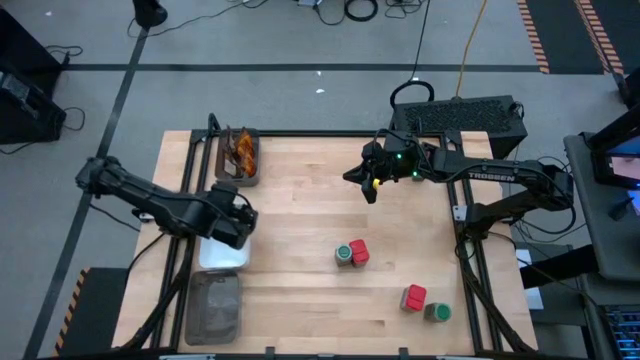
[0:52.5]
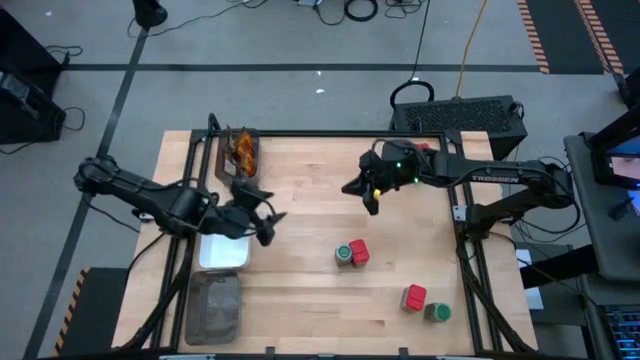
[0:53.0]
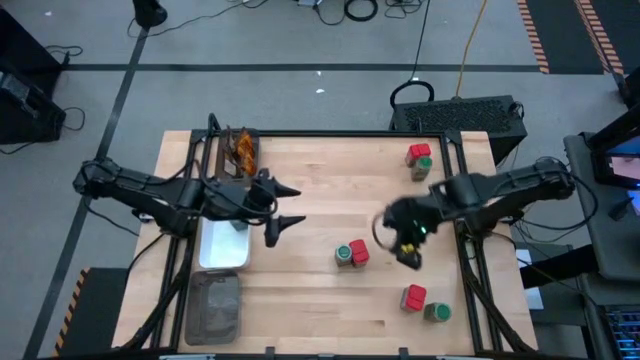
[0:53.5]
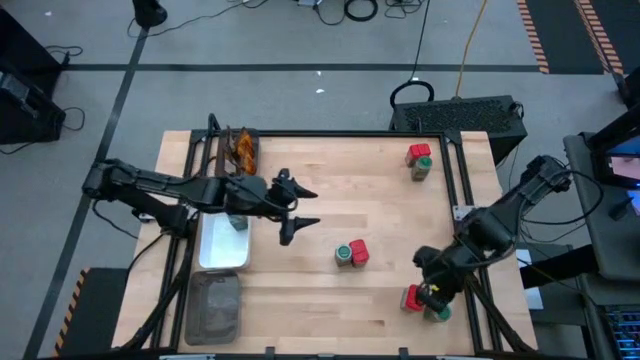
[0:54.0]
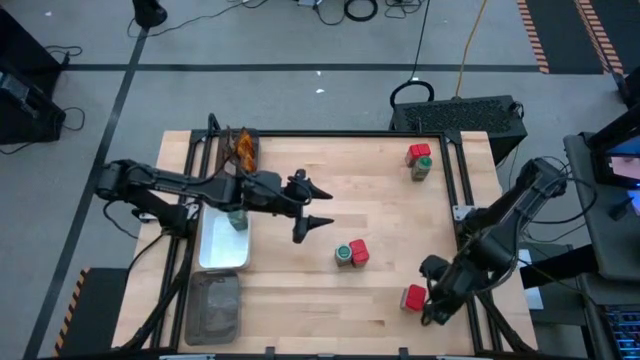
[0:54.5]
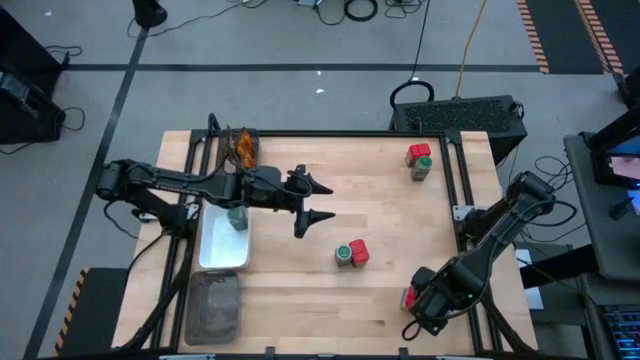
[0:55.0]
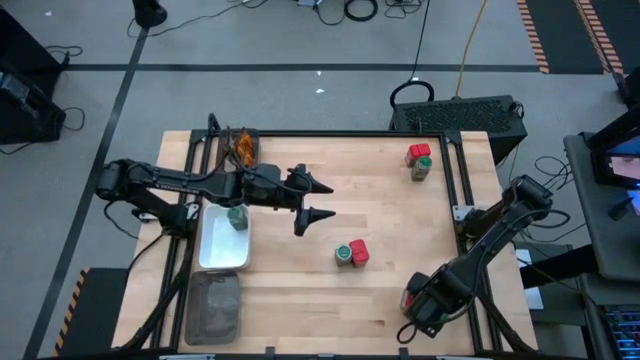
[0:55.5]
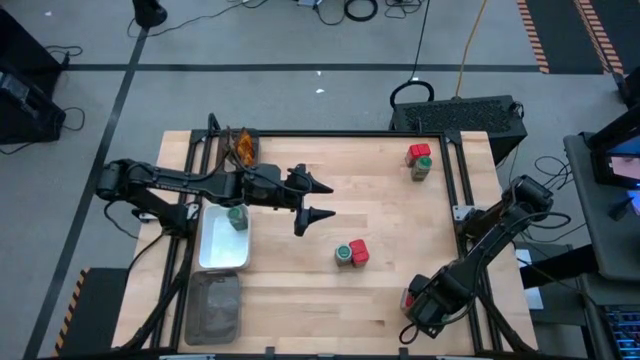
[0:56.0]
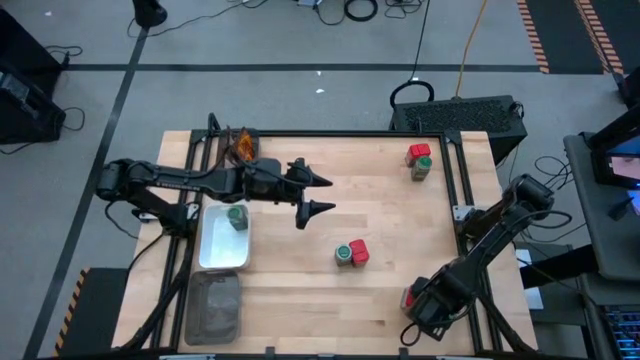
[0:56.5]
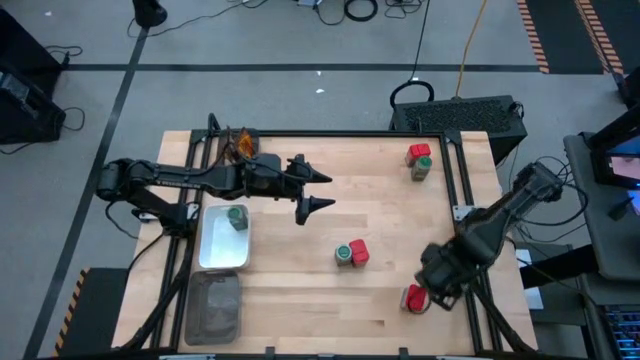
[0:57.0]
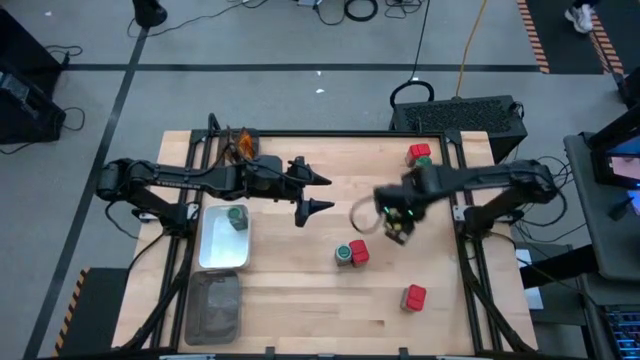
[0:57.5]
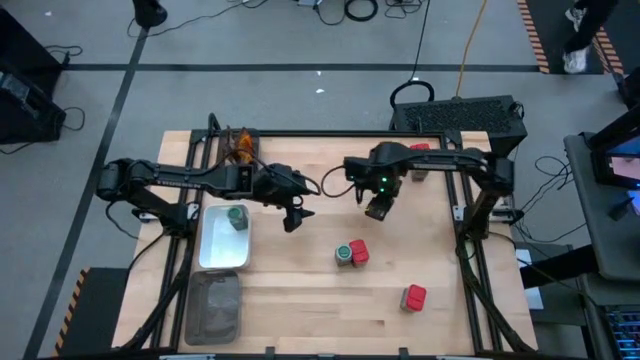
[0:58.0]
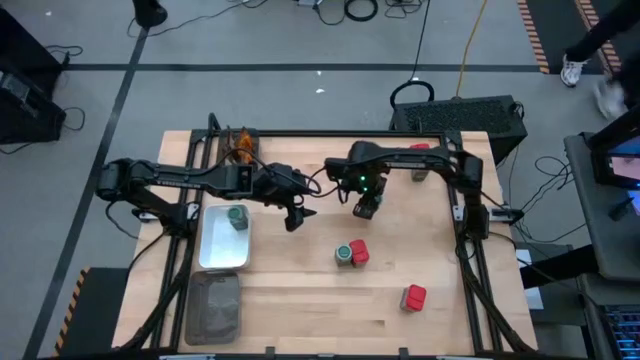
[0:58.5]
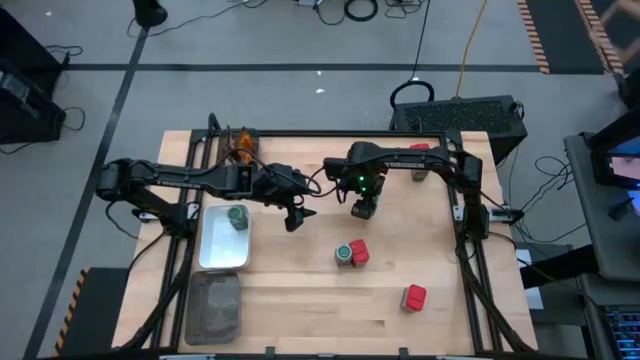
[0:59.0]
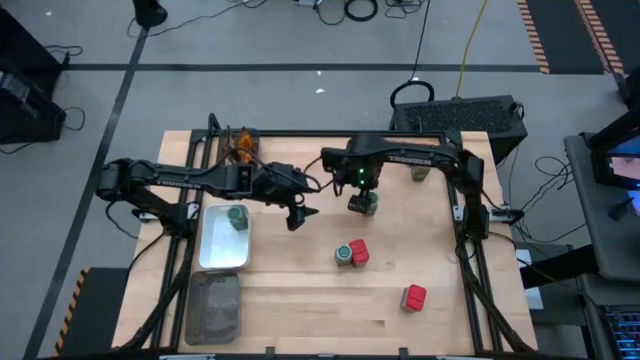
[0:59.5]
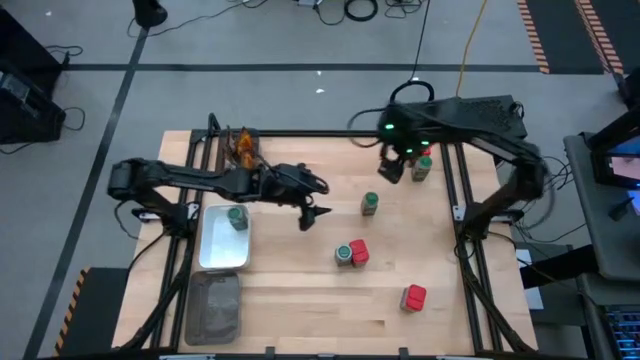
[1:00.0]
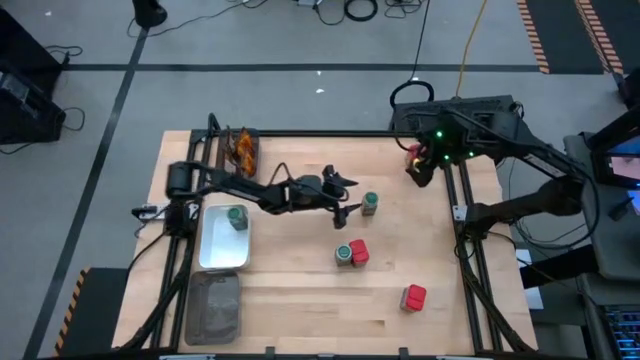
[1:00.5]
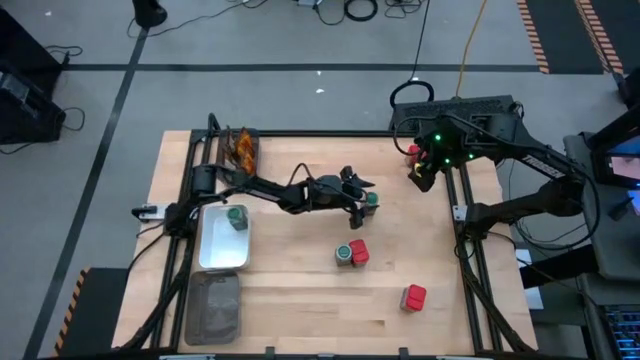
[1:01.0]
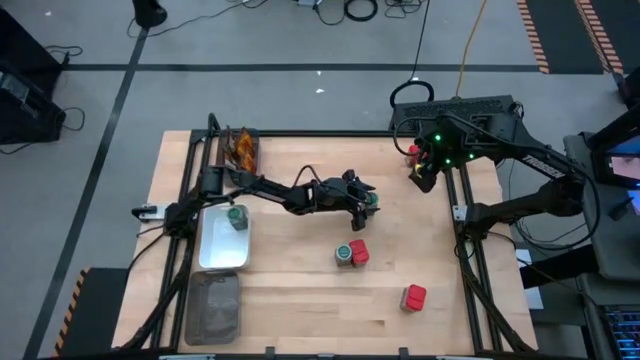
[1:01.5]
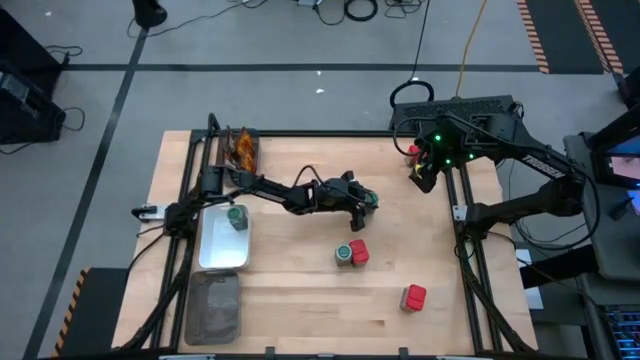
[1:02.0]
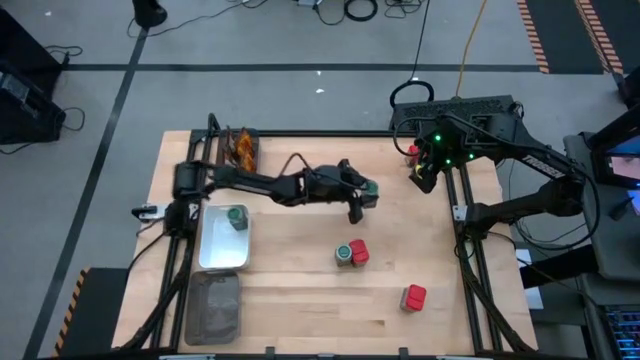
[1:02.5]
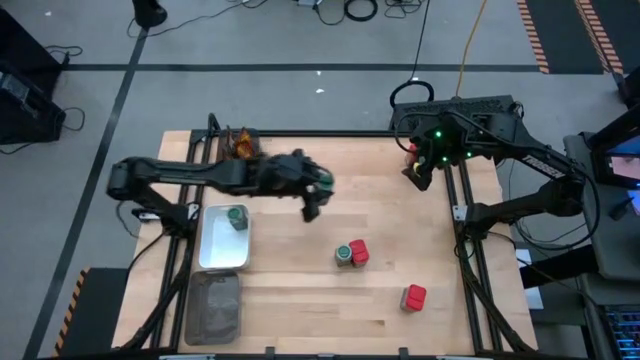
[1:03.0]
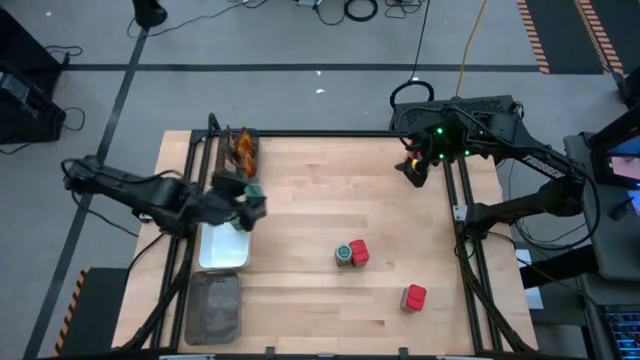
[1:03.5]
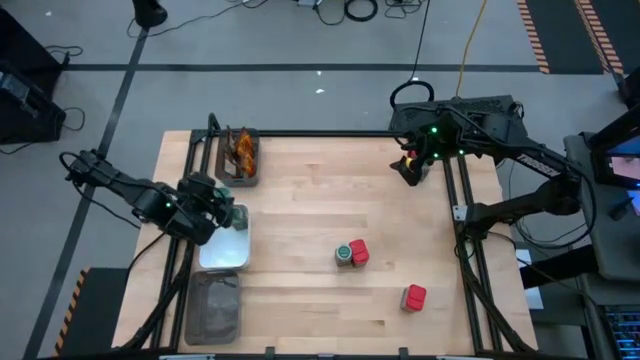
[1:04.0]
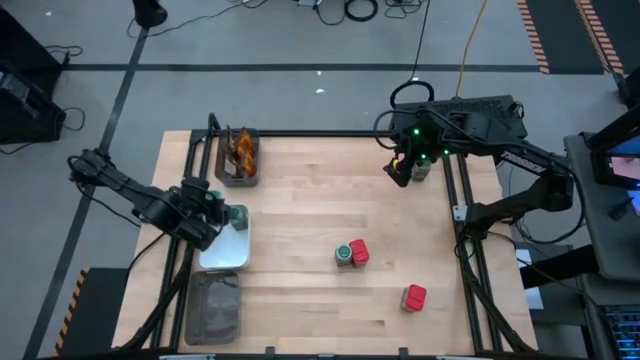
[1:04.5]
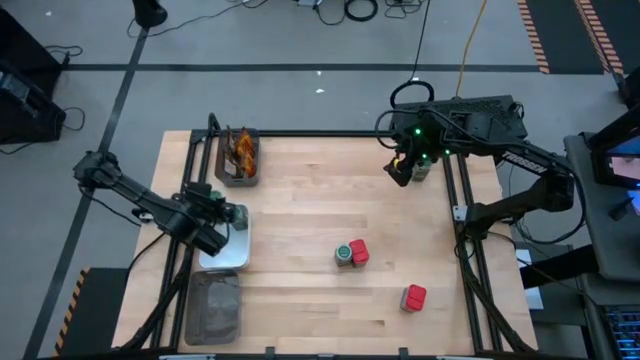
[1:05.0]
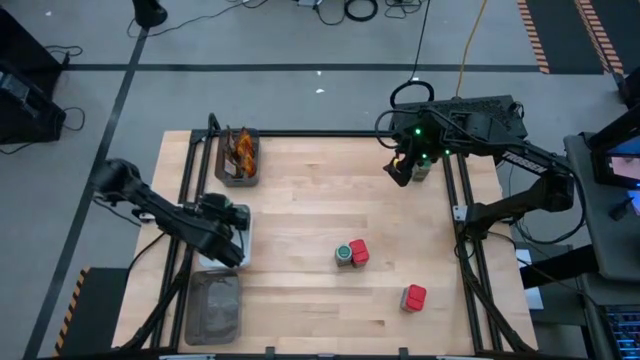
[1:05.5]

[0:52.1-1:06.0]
Task: Sort spices by type
Put the bottom green seasoning bottle into the white bin

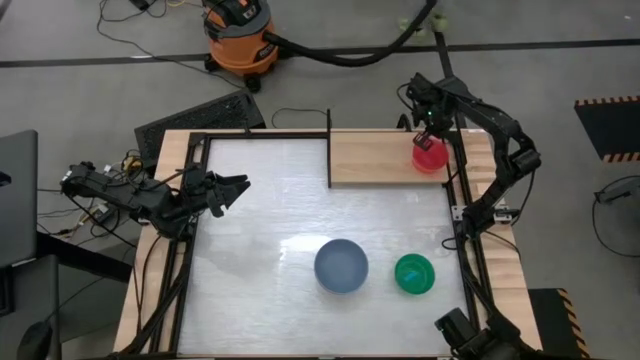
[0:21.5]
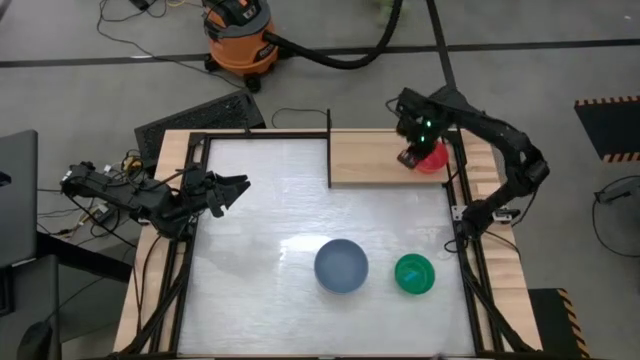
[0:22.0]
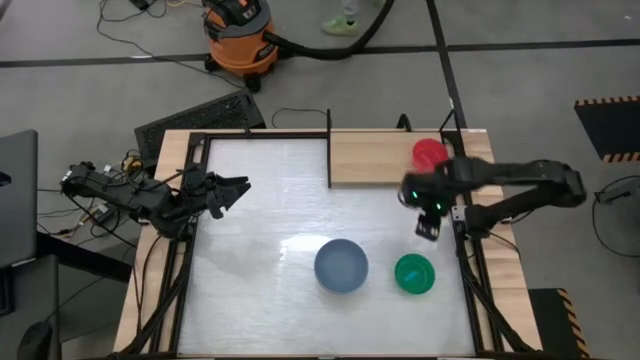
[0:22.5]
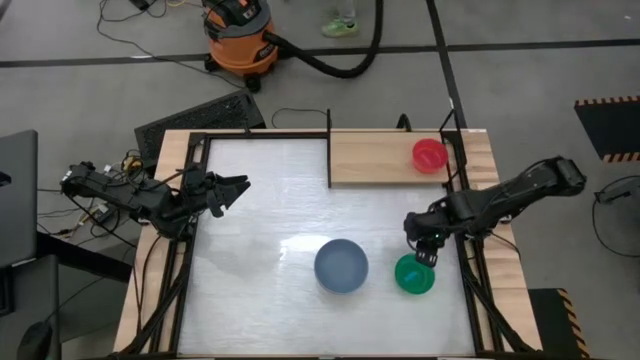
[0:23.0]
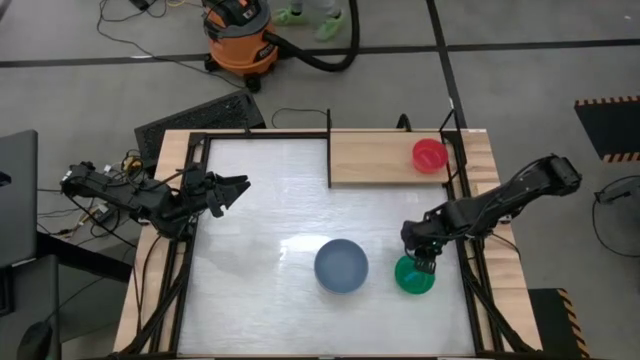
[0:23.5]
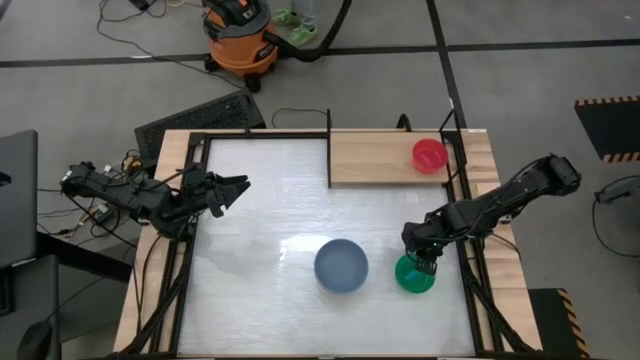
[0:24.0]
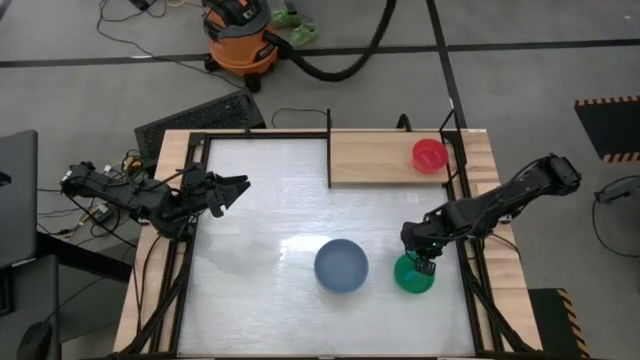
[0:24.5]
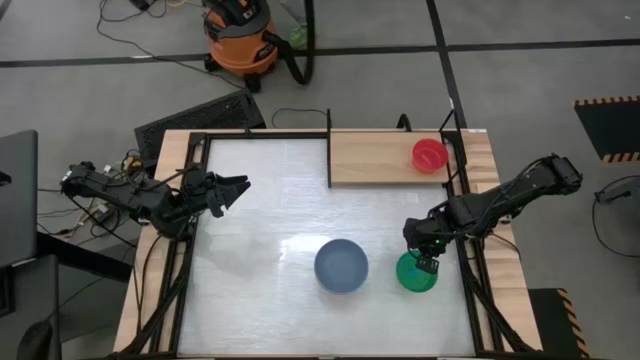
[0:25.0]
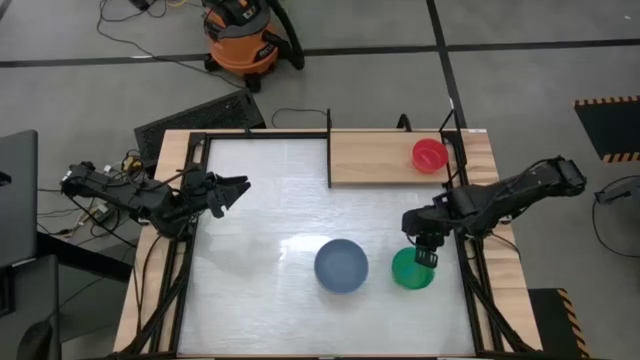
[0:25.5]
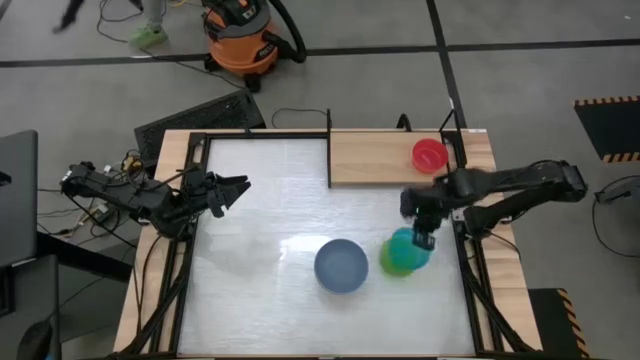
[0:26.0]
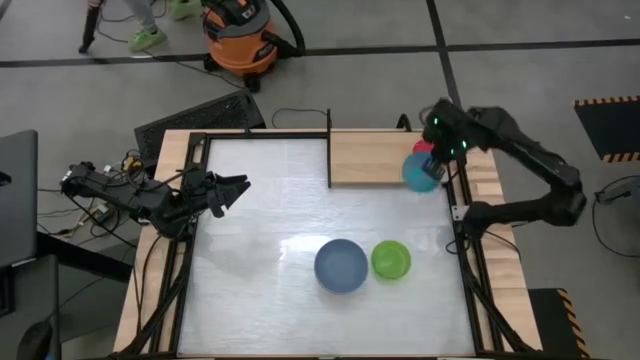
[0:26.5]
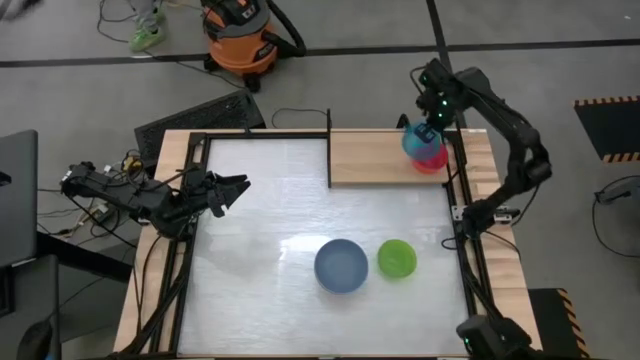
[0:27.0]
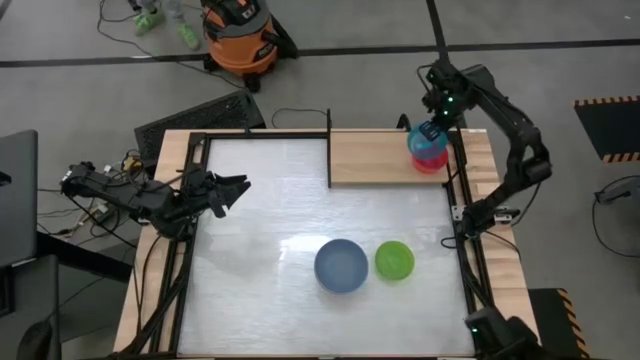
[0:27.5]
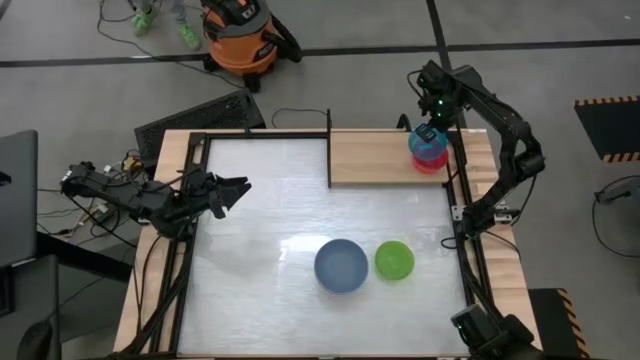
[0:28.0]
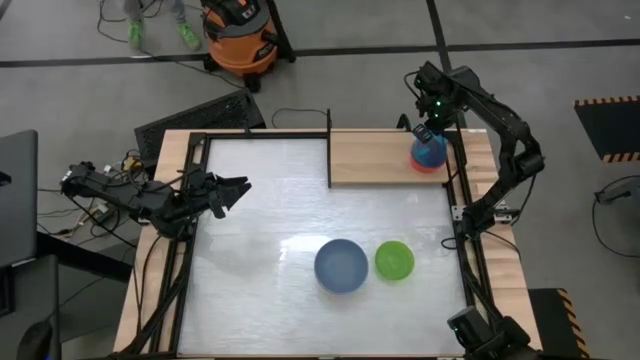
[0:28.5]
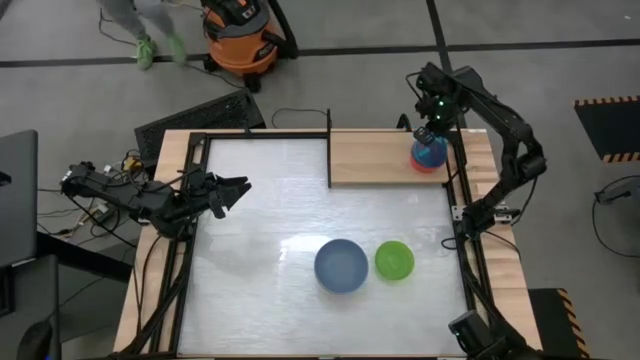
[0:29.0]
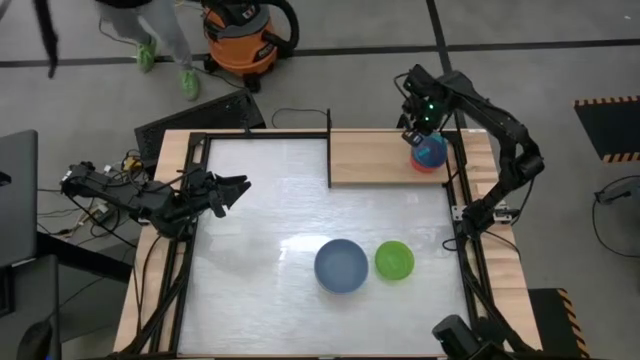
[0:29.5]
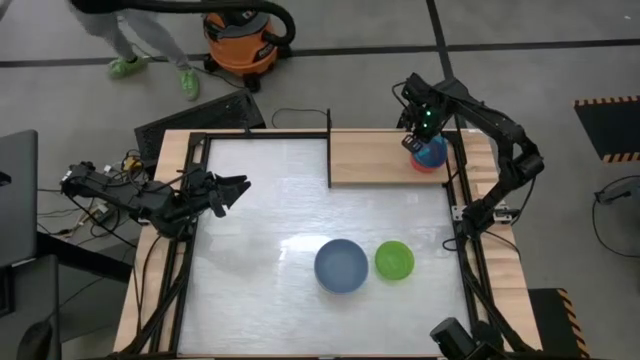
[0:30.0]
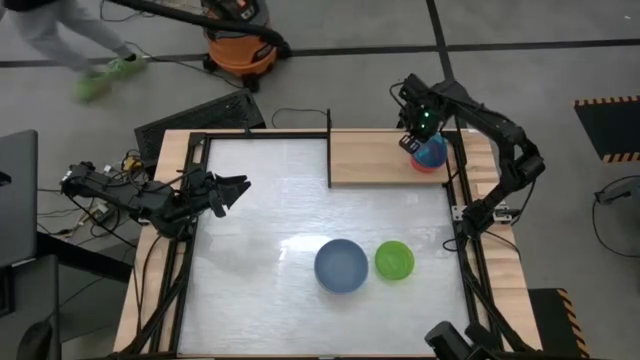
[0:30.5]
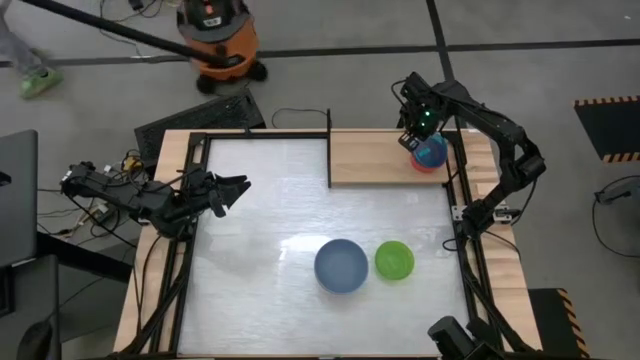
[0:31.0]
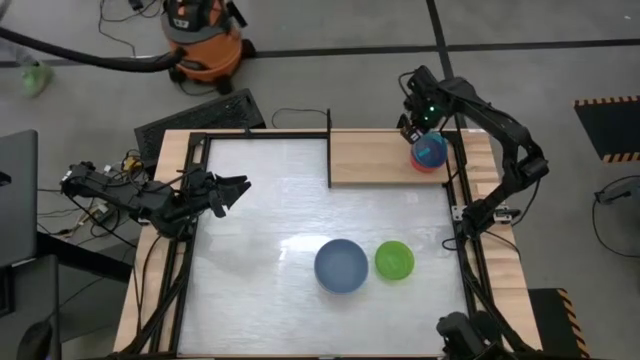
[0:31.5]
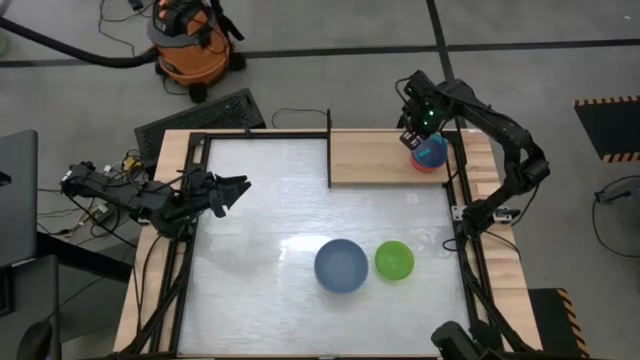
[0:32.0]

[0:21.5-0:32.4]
Task: Place and stack bowls onto a shelf
Stack the blue transparent bowl on top of the pink transparent bowl on the shelf
